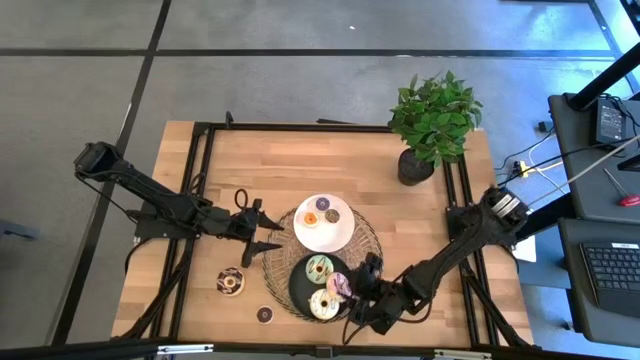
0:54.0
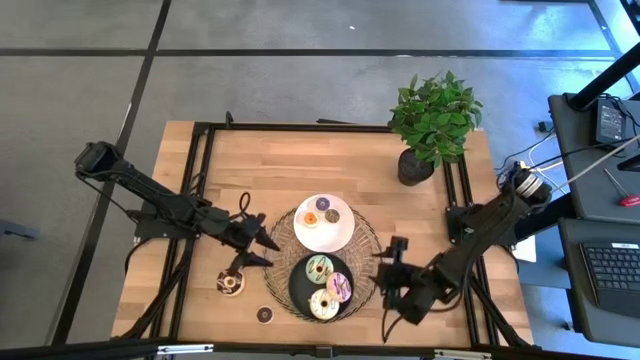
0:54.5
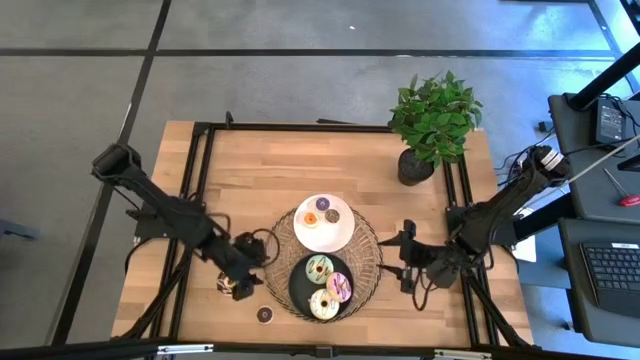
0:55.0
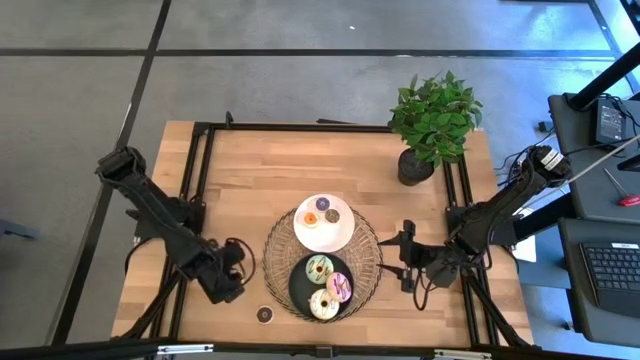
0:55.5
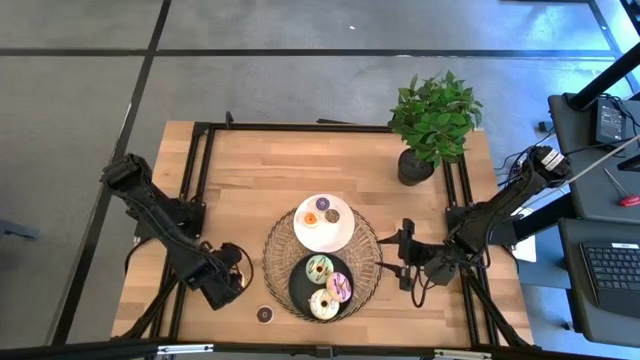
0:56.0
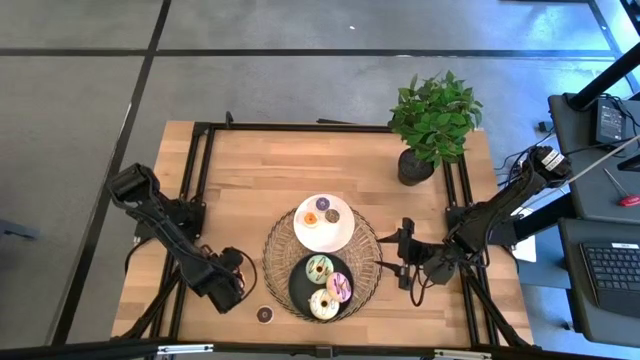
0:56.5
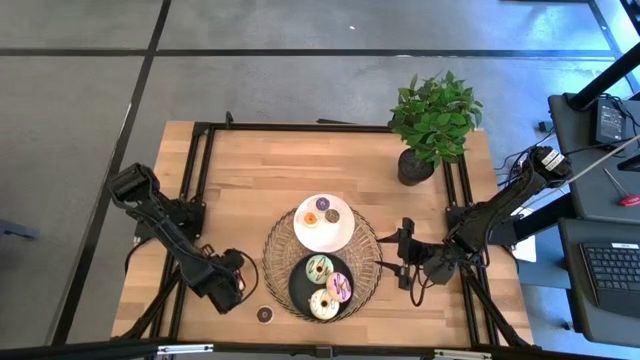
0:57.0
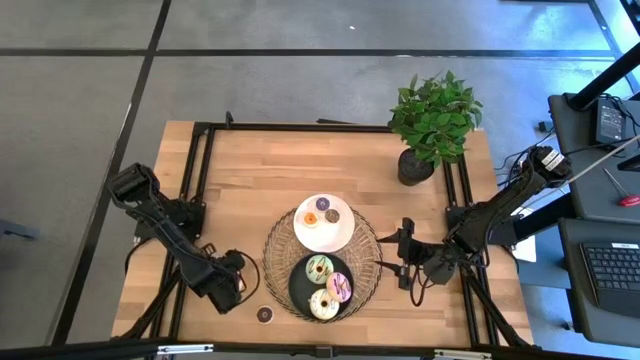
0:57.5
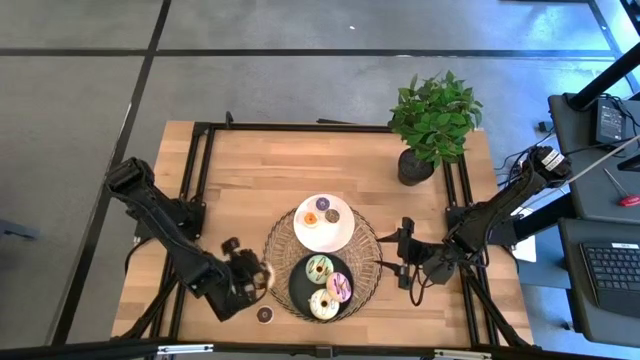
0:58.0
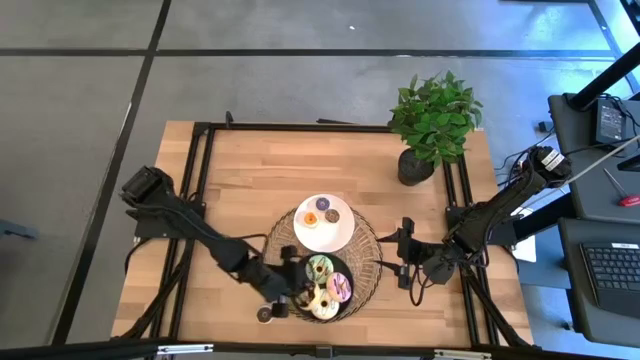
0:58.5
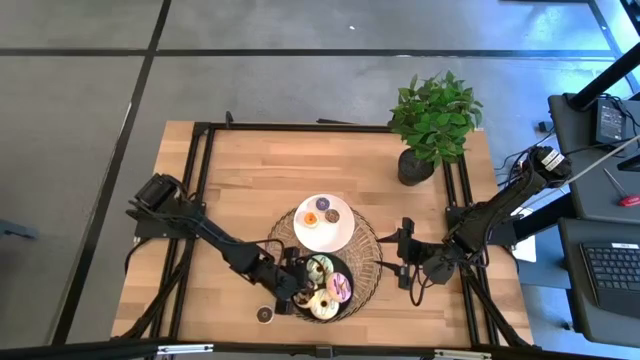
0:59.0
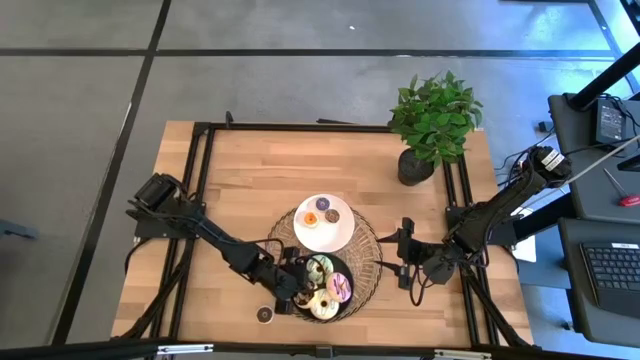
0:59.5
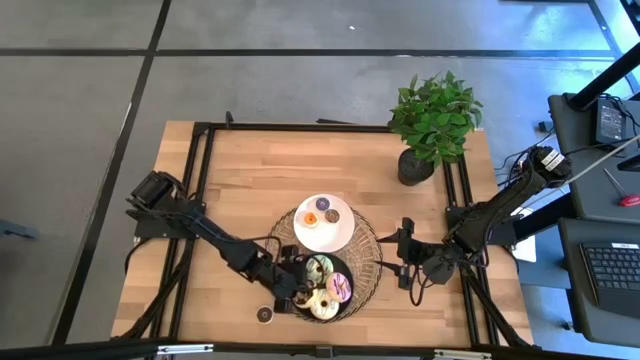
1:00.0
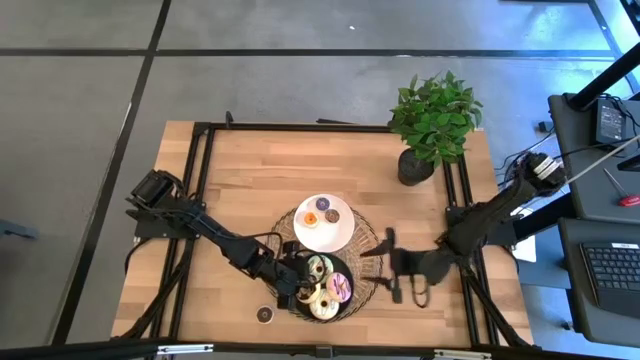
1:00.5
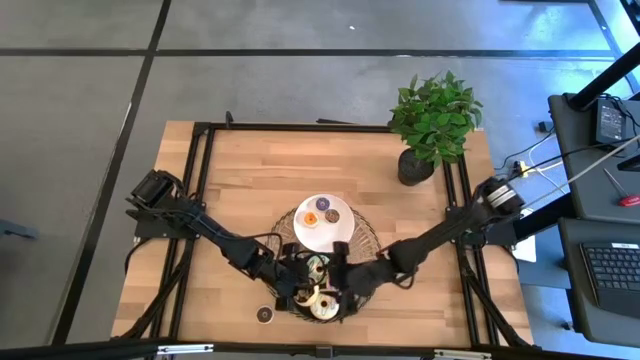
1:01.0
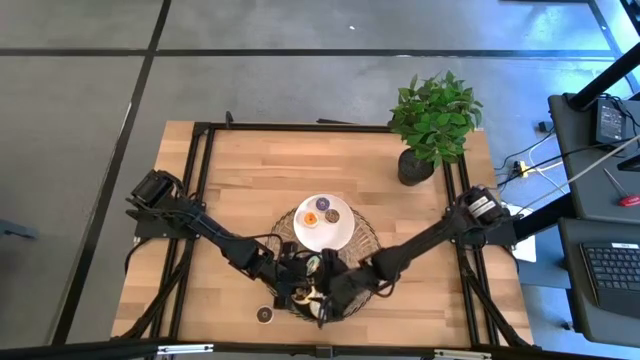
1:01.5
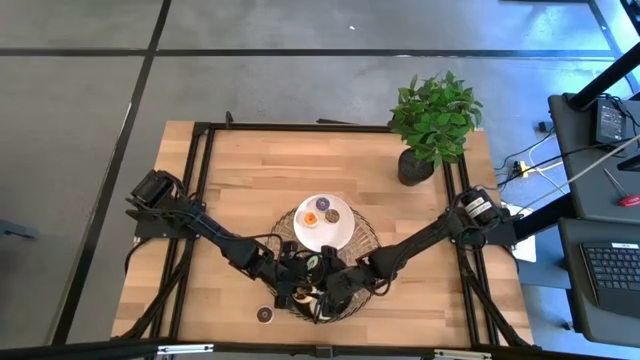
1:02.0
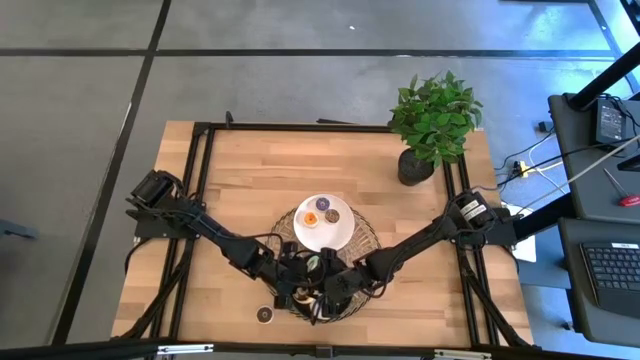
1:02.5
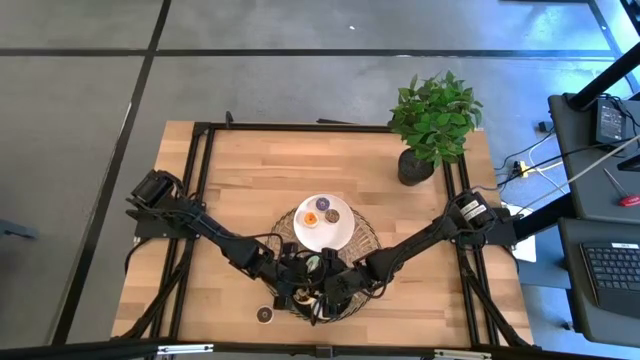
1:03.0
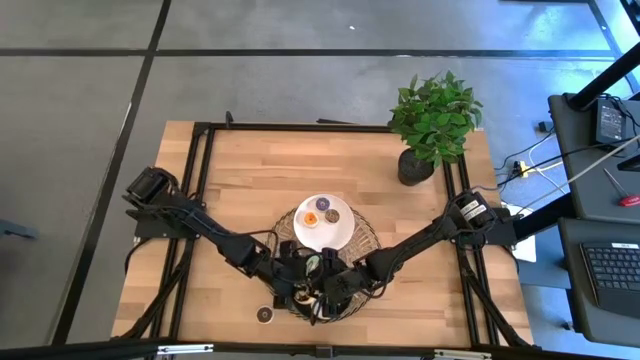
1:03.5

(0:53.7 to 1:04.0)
Task: Pick & Place donuts
Put the big black doughnut on the black plate

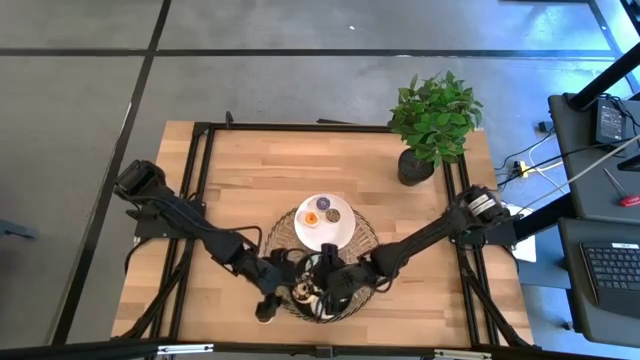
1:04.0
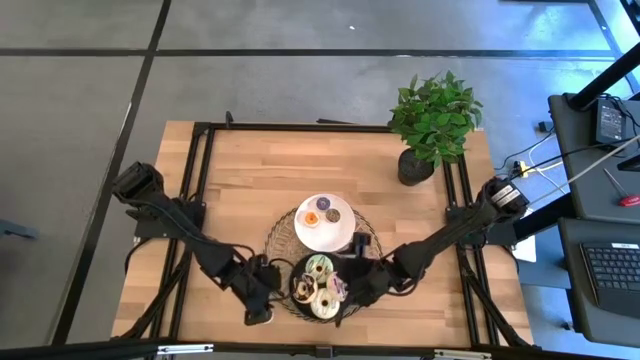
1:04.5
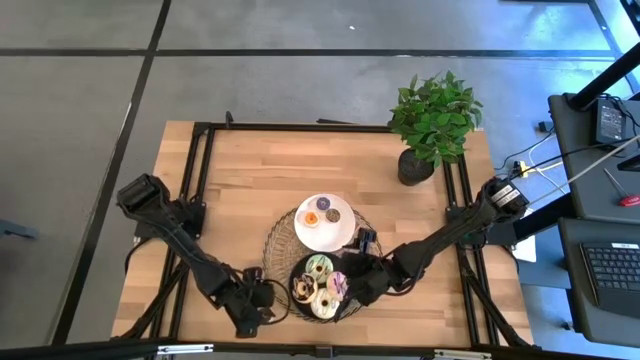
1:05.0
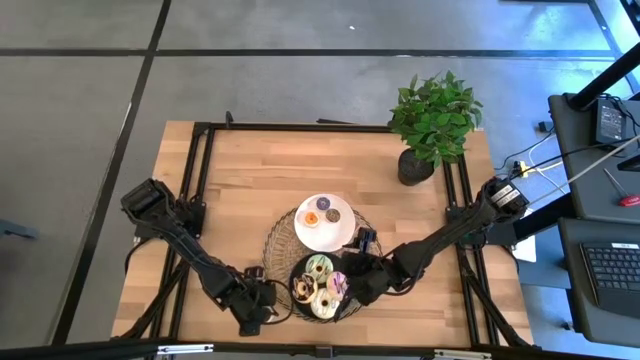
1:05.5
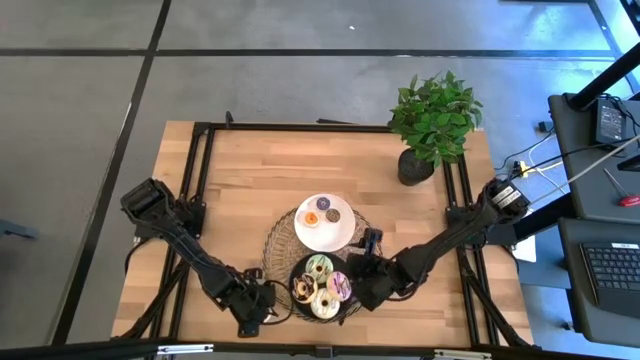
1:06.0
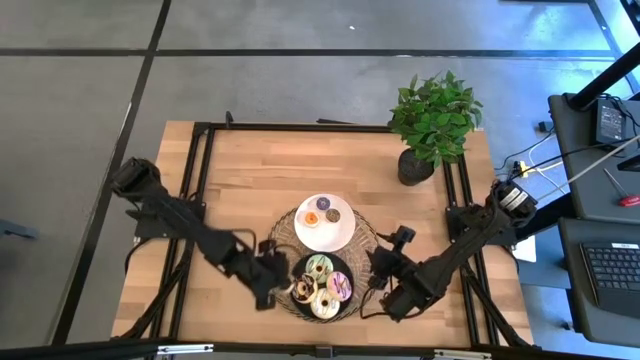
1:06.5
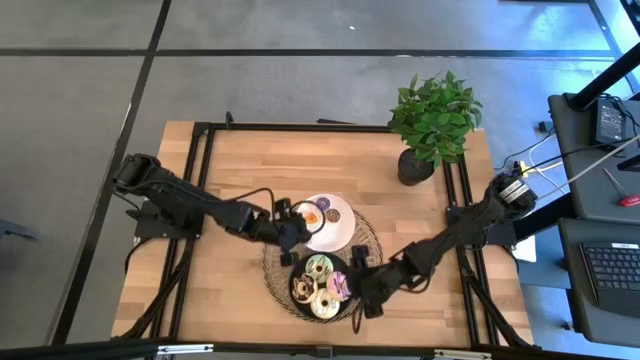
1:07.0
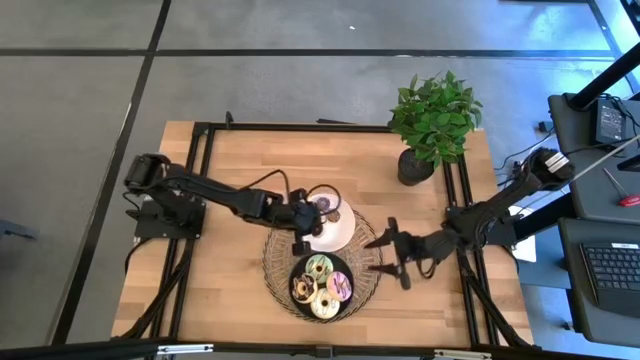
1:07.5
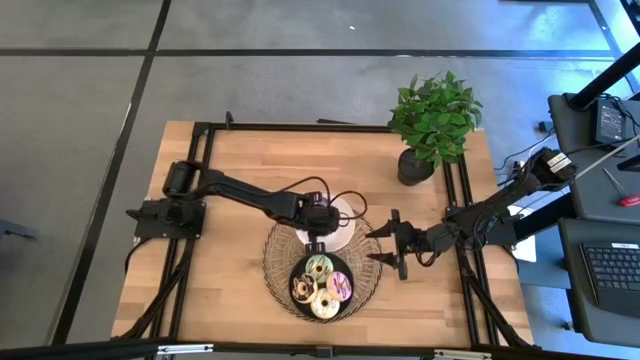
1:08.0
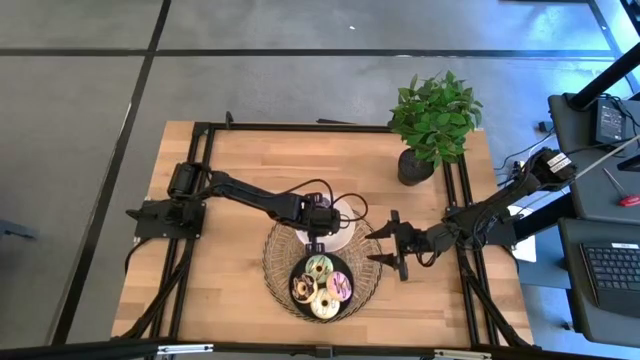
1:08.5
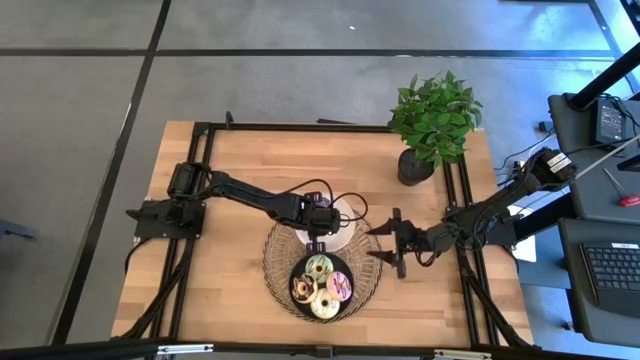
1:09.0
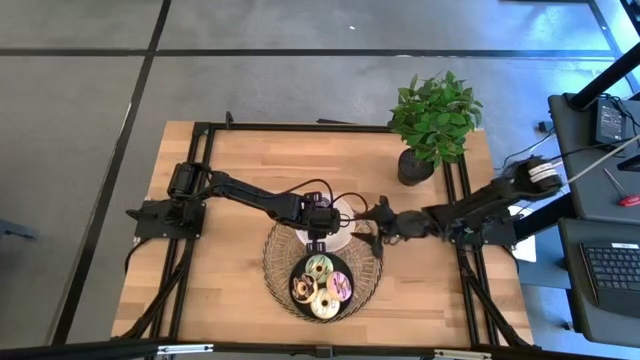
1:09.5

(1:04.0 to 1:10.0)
Put the small brown doughnut on the white plate

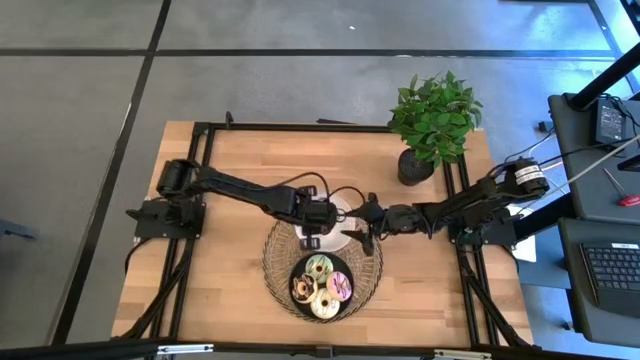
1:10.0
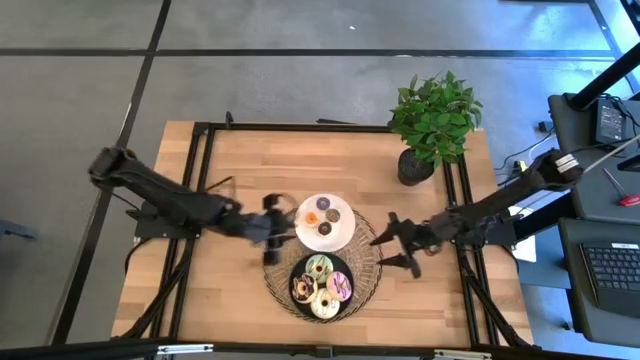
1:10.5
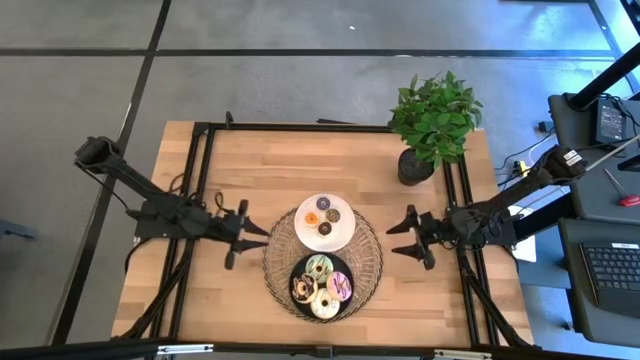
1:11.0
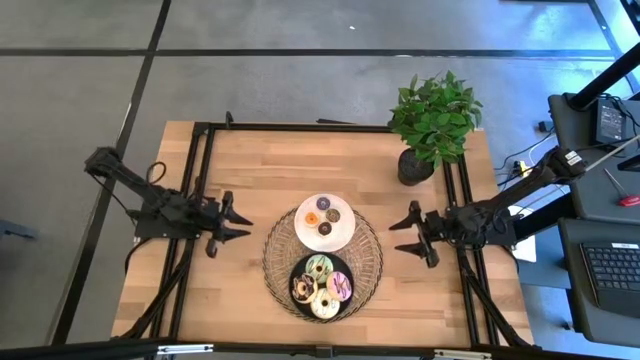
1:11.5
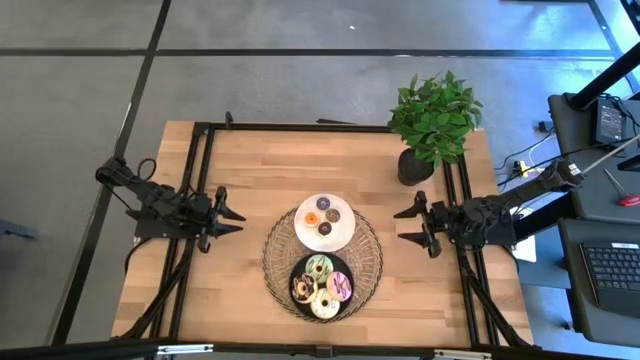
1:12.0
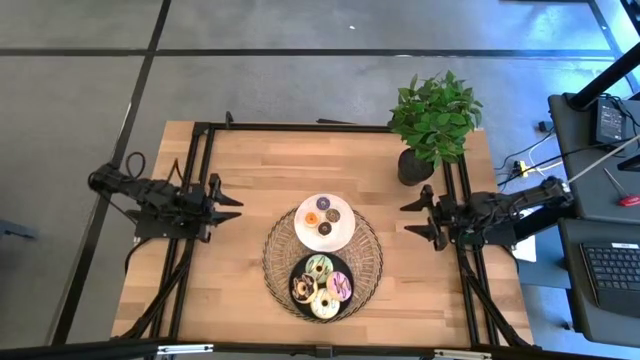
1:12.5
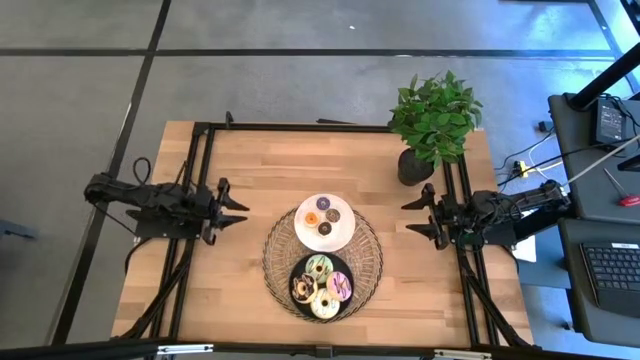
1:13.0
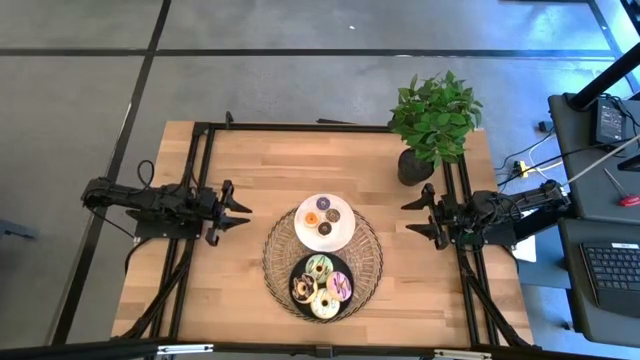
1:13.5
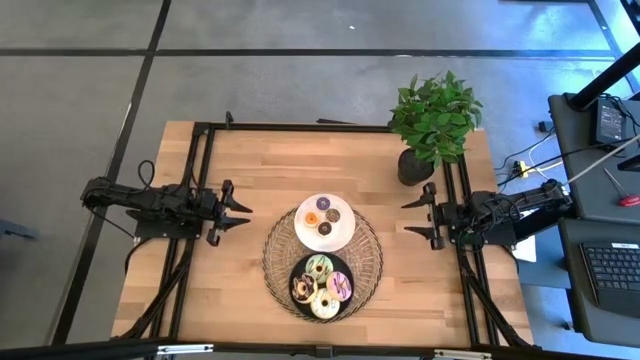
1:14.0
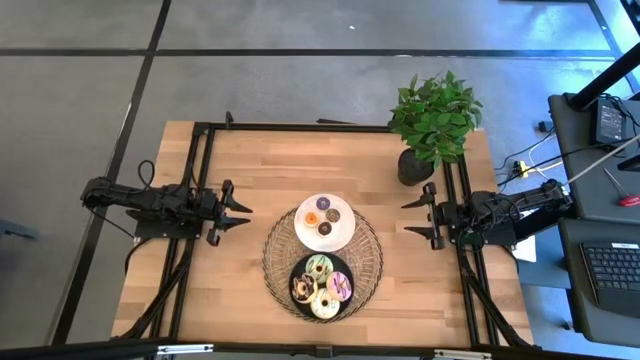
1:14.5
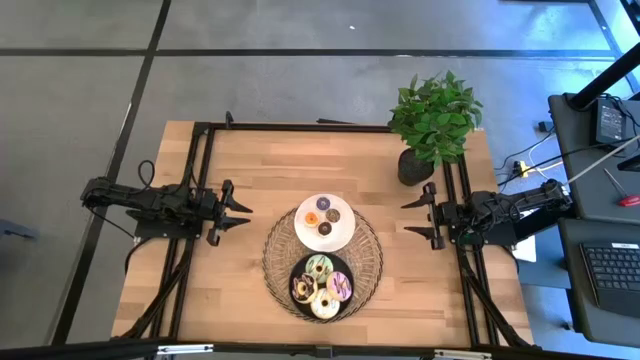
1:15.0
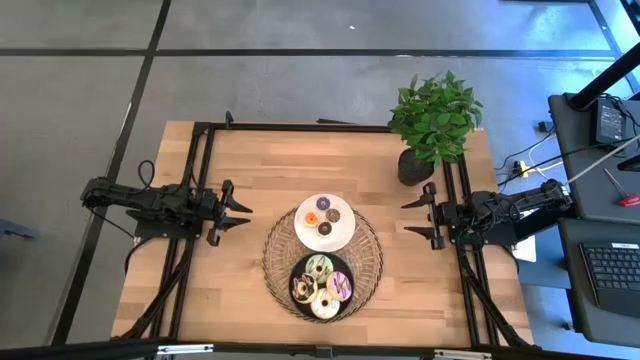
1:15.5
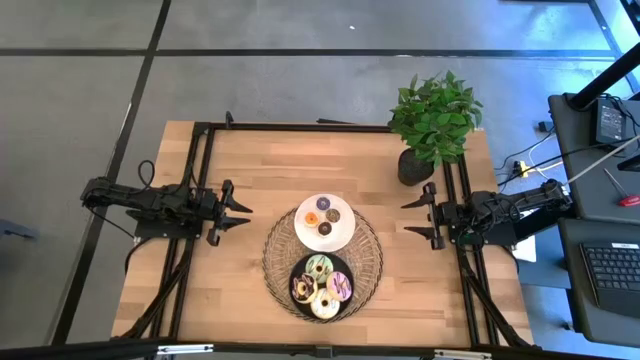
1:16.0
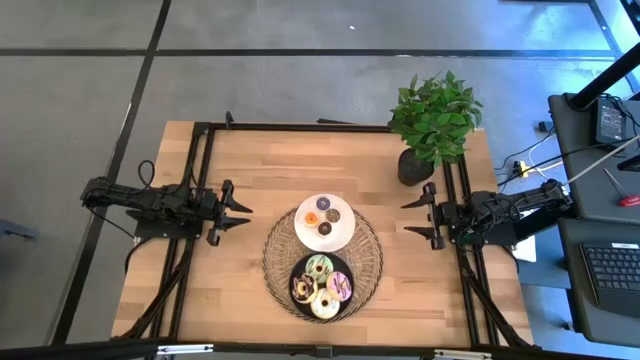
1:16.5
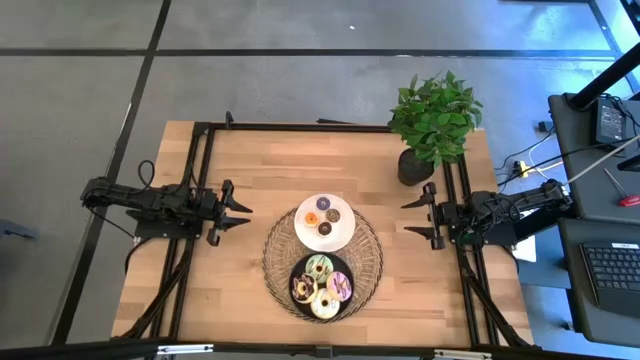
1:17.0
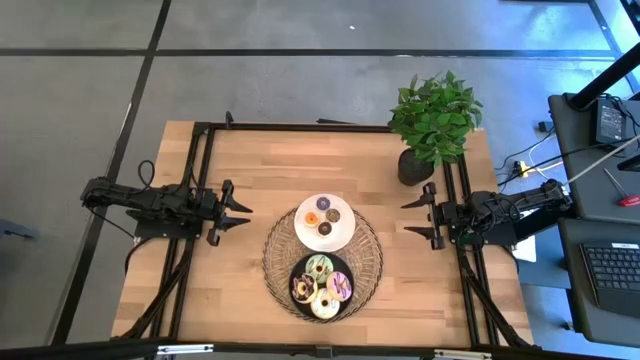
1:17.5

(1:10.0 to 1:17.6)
Return to Home Position
